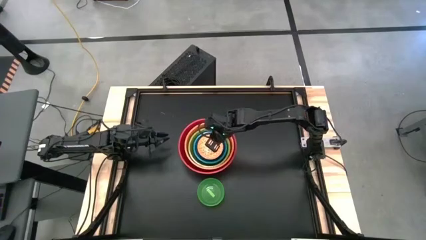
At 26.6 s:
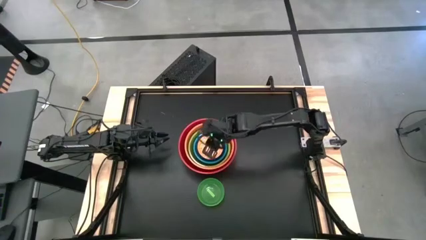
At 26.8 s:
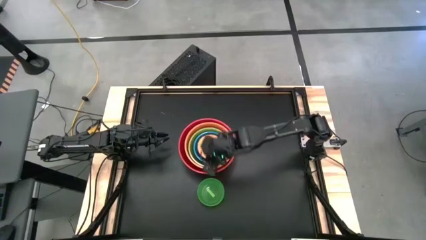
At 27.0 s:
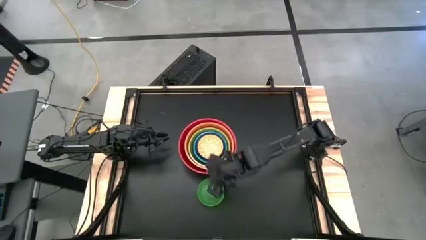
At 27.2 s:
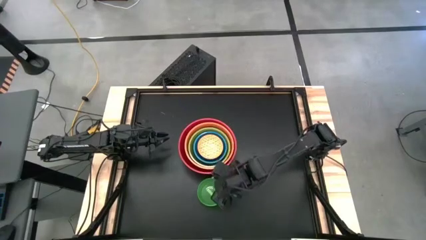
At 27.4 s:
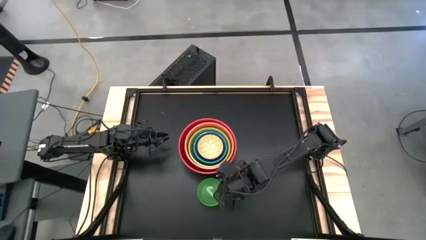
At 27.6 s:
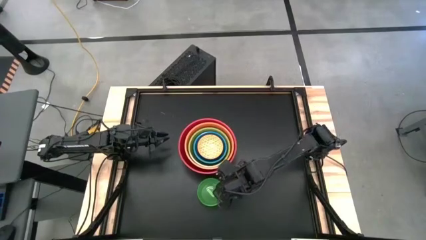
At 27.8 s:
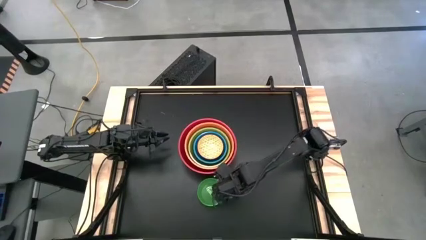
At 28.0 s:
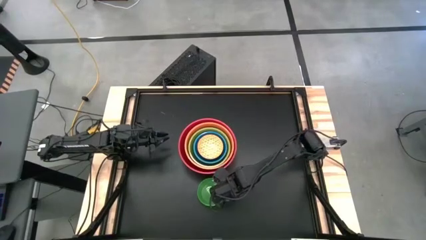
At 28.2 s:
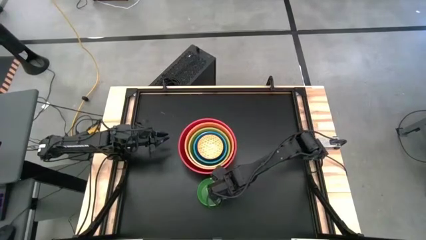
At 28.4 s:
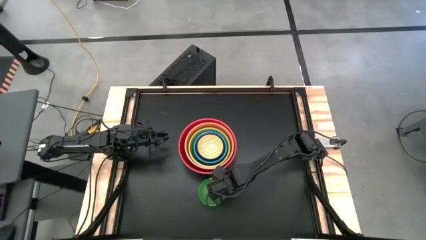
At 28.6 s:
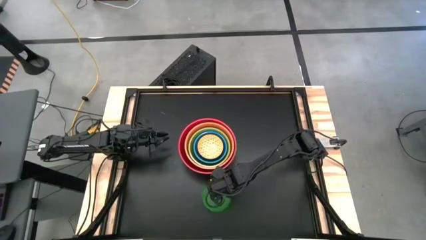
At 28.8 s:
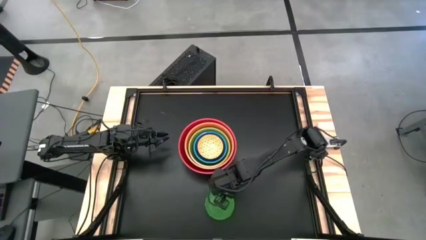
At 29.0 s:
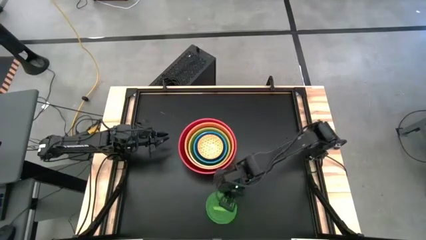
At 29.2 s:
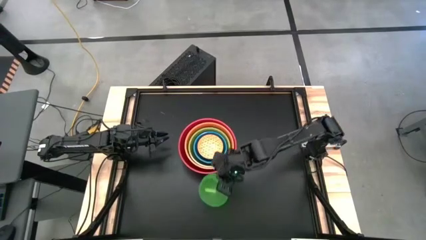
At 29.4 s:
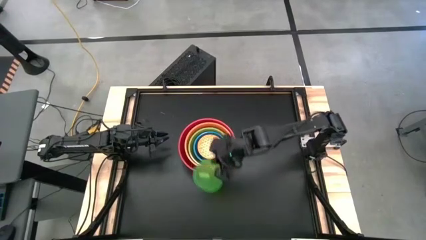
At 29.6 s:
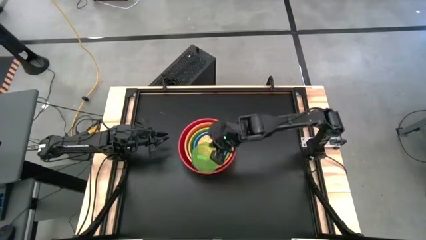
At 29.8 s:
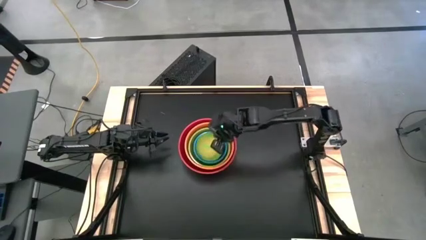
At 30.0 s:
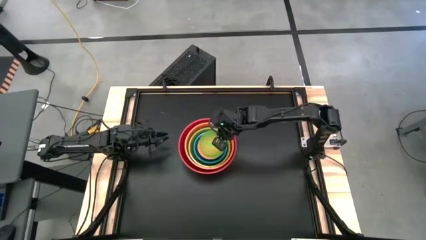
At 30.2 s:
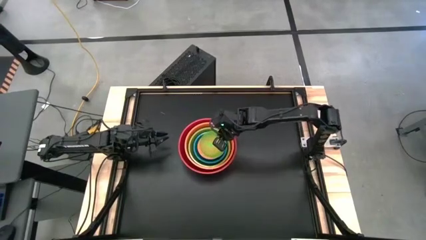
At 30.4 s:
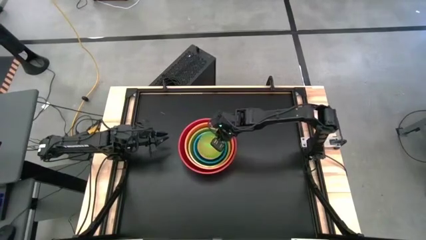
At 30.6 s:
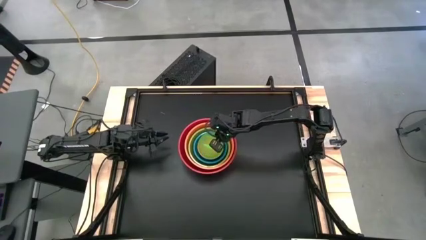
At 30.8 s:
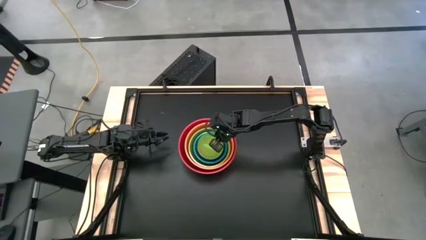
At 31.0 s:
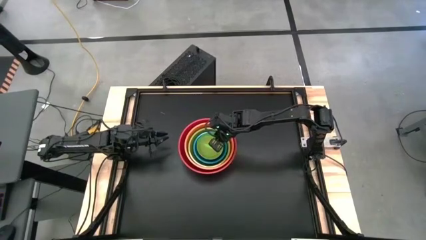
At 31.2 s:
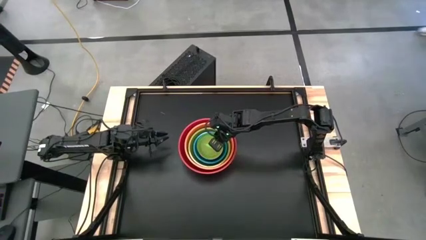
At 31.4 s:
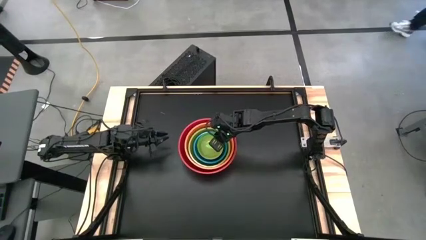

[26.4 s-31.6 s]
Stack the green transparent bowl on top of the patterned bowl

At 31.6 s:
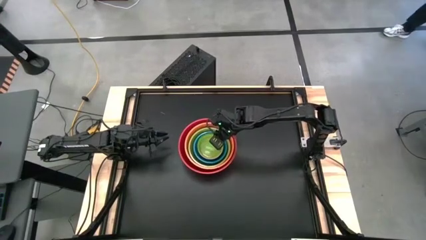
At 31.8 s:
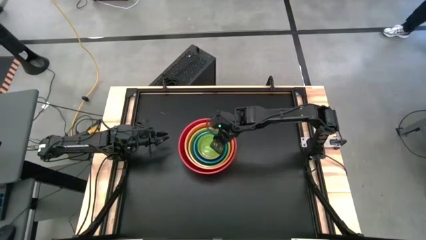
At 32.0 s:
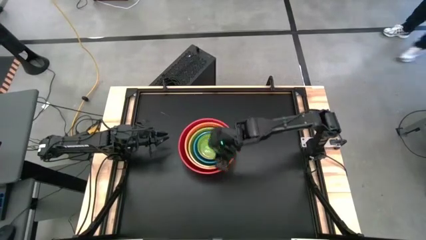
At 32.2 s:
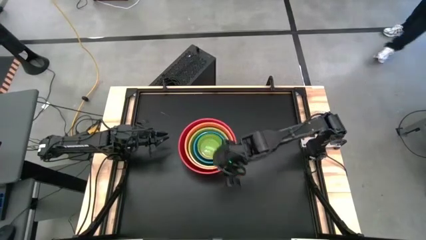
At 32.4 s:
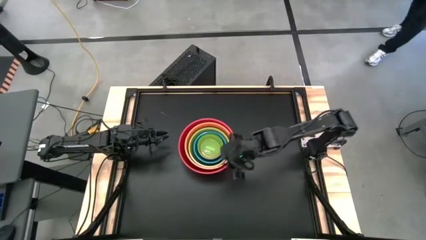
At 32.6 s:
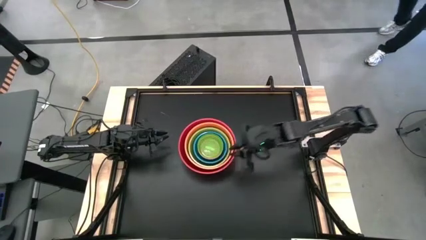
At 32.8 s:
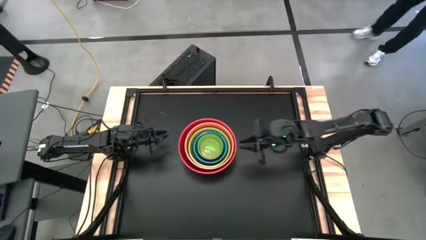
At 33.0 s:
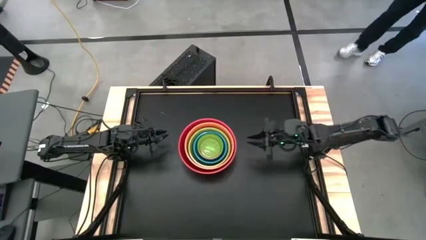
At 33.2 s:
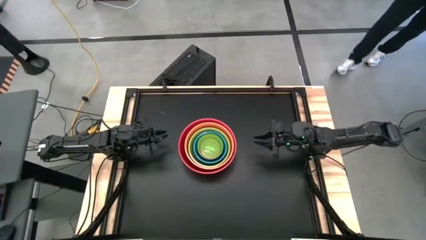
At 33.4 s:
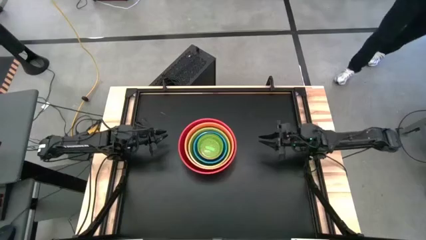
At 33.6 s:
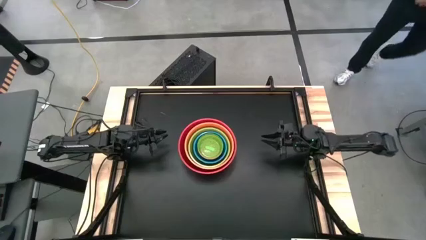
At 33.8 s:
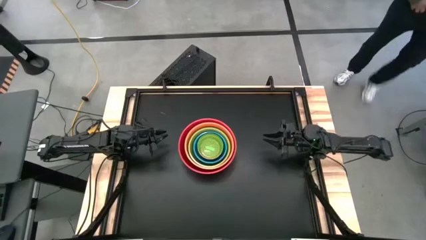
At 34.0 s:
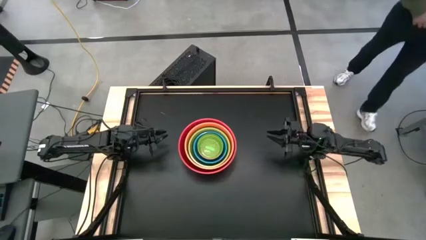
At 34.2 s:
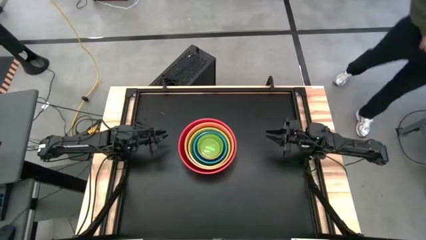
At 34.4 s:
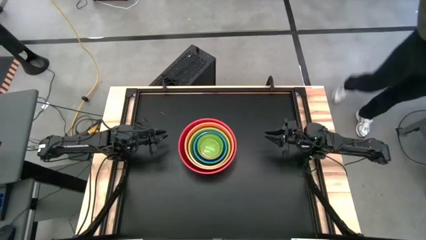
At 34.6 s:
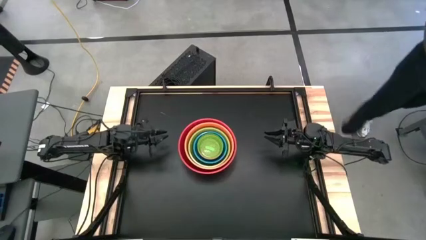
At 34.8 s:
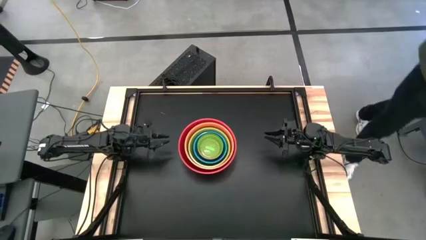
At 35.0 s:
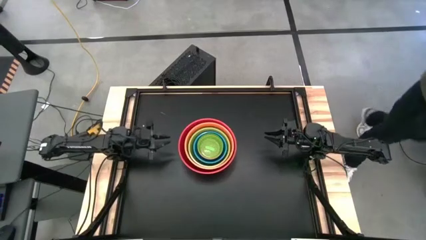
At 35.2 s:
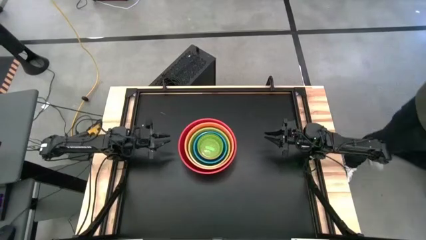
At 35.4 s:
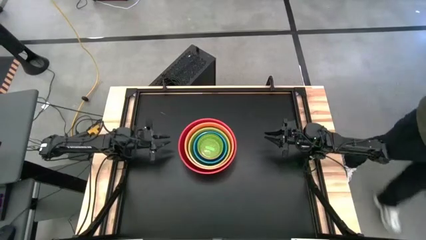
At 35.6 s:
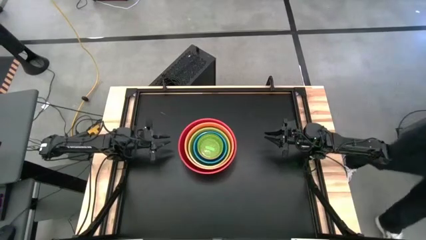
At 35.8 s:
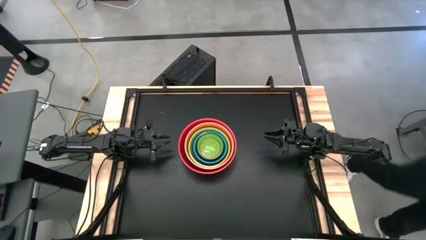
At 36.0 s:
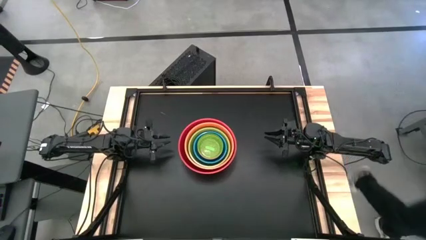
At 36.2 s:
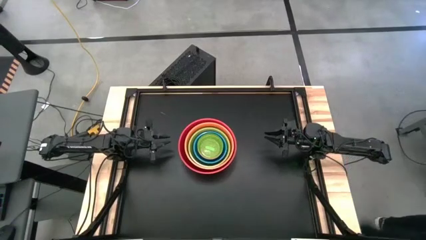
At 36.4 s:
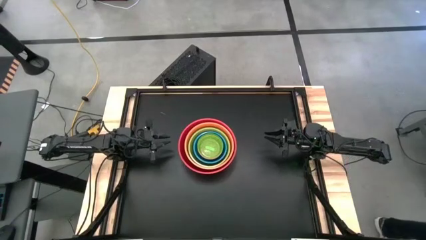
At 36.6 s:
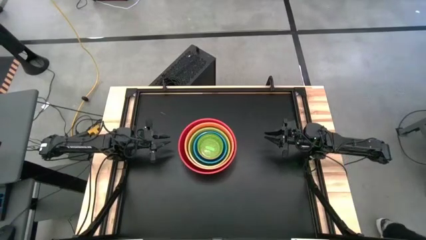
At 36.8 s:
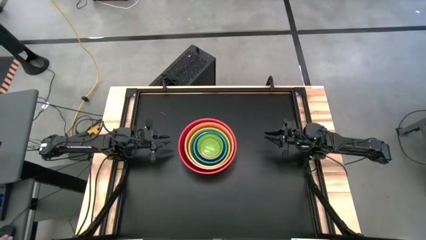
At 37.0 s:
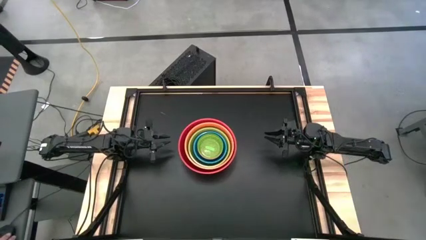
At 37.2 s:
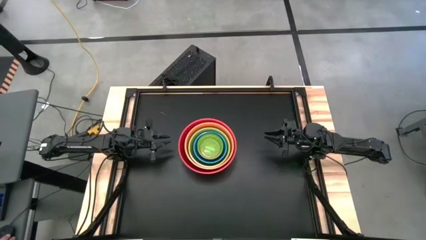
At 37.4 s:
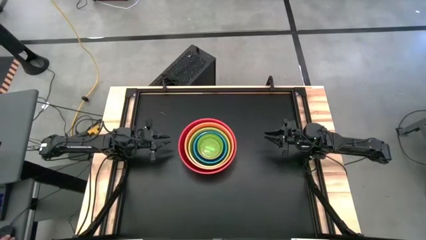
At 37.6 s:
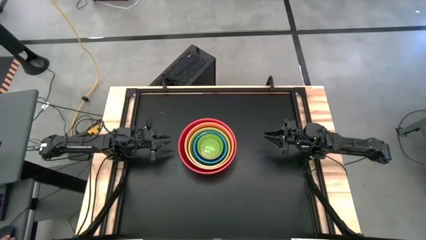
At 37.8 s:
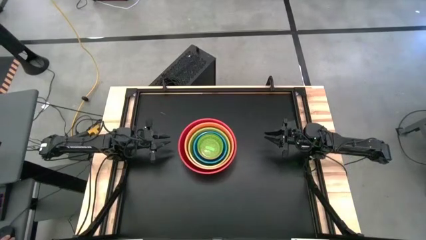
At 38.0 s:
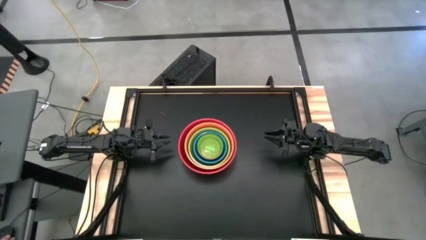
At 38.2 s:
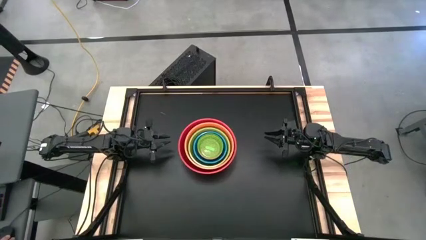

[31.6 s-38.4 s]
Return to Home Position

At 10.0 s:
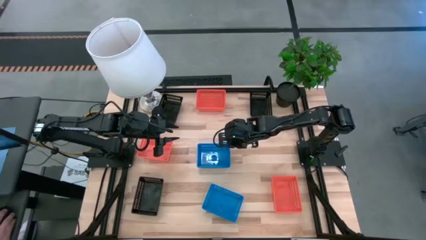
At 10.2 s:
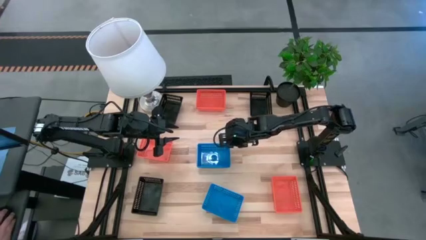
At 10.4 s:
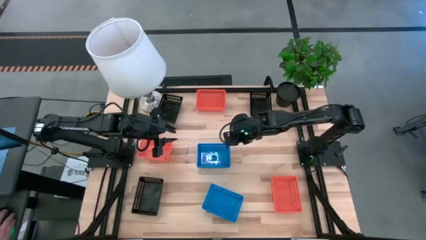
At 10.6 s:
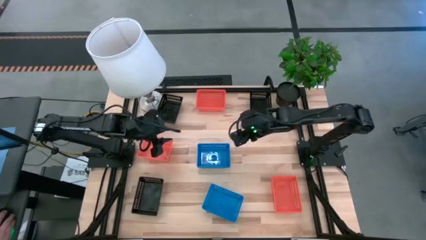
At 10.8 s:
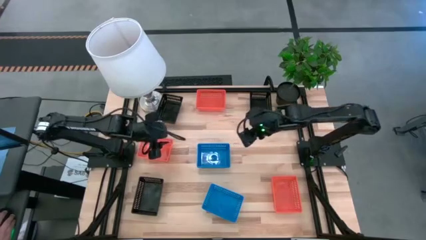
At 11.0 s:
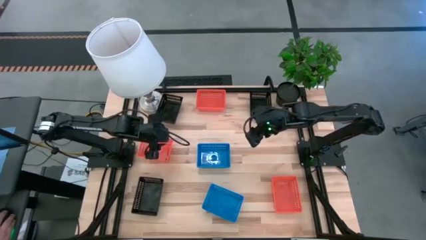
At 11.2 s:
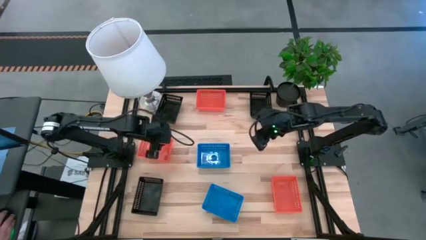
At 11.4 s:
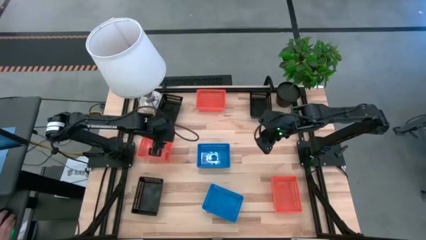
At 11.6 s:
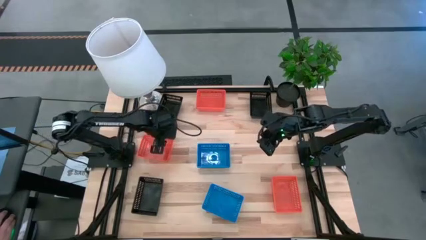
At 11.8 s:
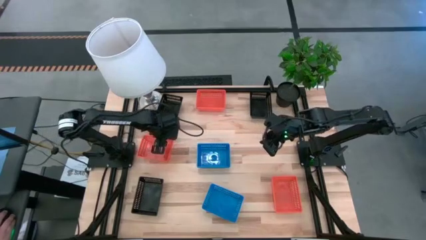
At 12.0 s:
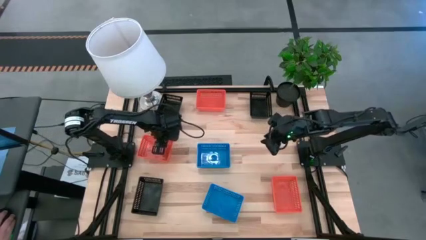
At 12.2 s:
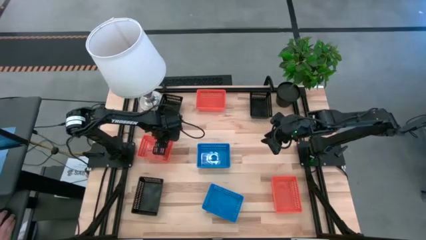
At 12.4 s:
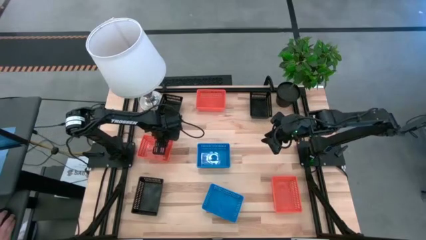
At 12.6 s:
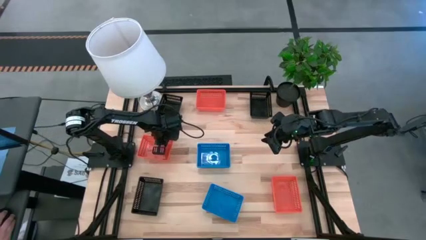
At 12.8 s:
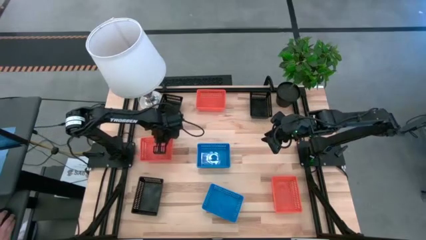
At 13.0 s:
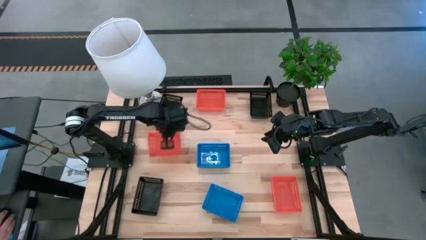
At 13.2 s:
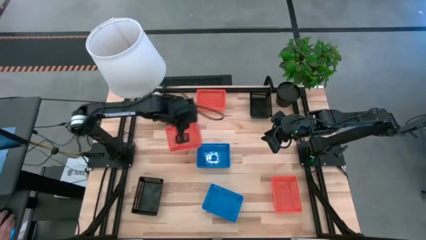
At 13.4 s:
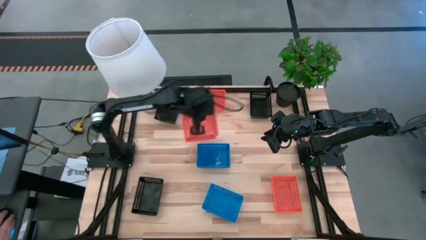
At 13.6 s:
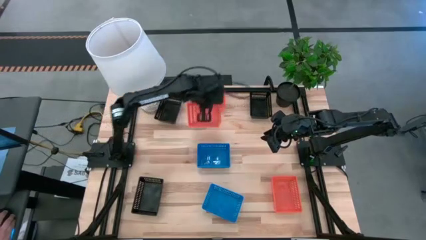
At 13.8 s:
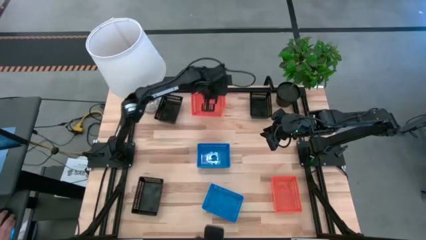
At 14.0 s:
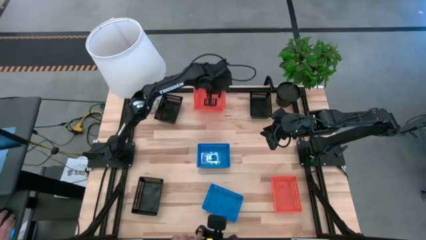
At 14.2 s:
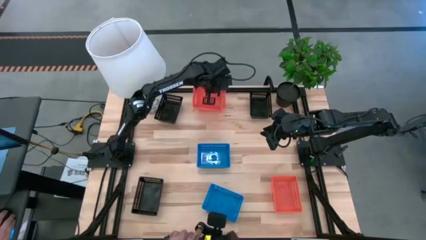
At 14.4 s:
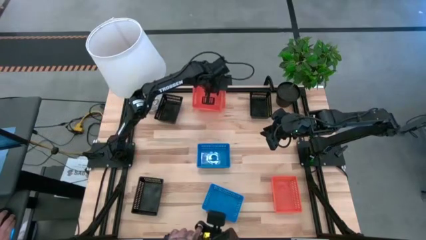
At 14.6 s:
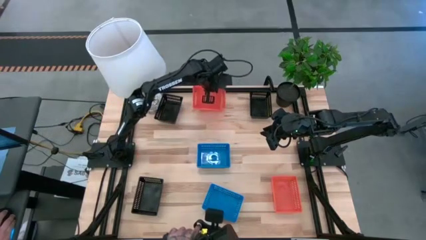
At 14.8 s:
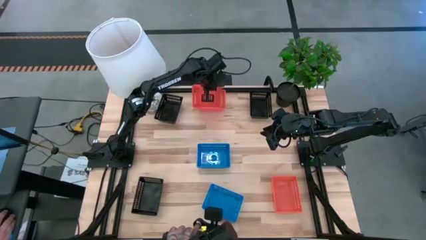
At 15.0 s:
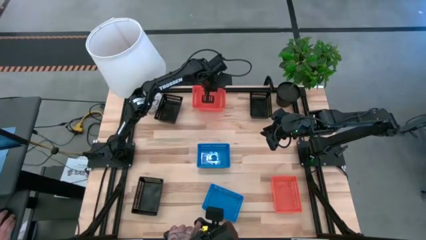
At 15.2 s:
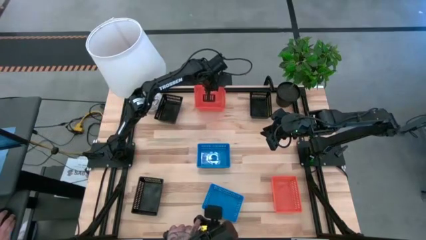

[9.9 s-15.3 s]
Stack the middle orange bin on the top orange bin
